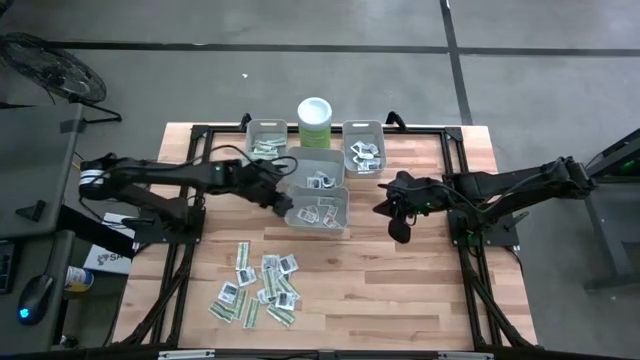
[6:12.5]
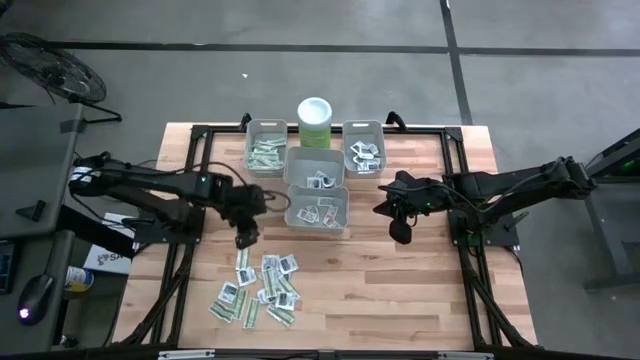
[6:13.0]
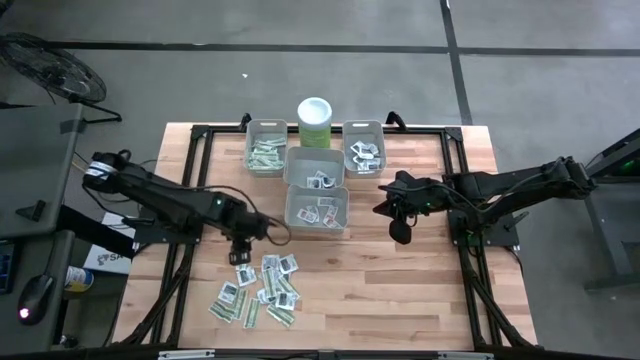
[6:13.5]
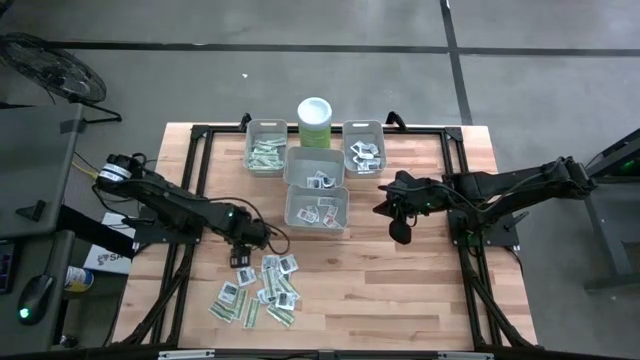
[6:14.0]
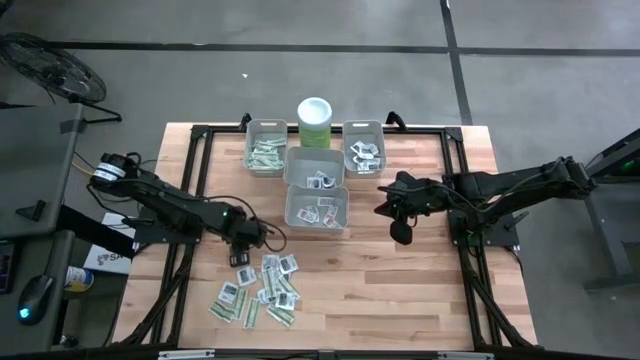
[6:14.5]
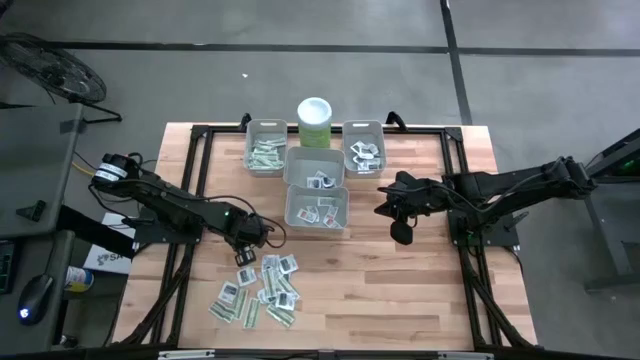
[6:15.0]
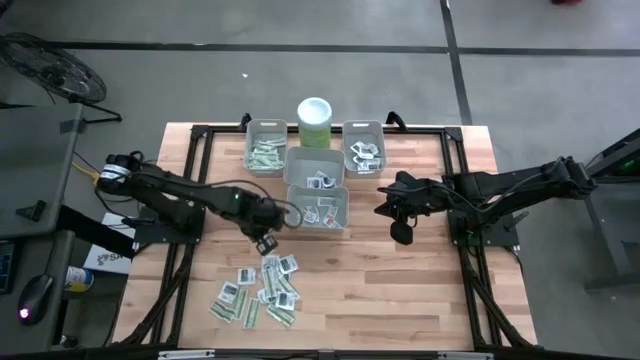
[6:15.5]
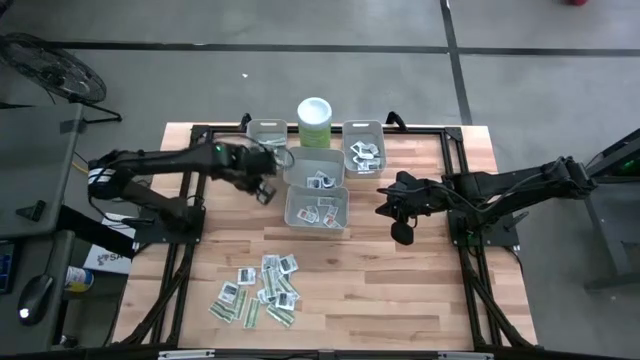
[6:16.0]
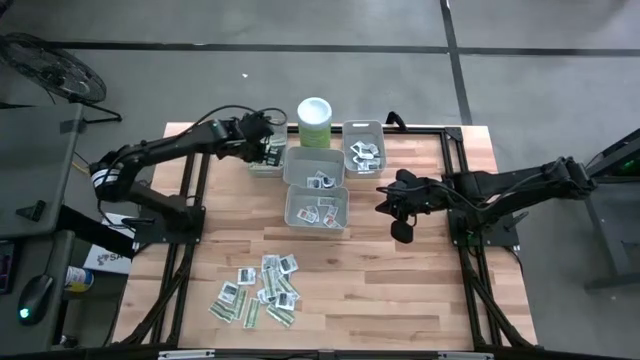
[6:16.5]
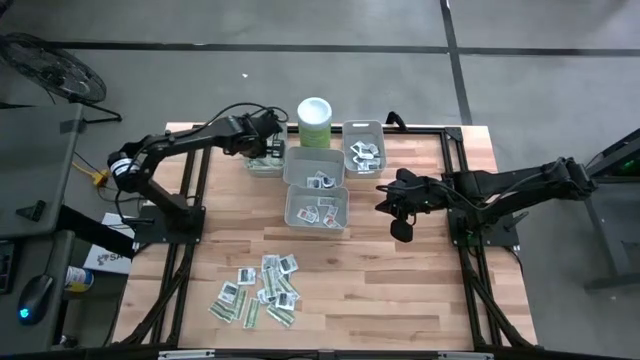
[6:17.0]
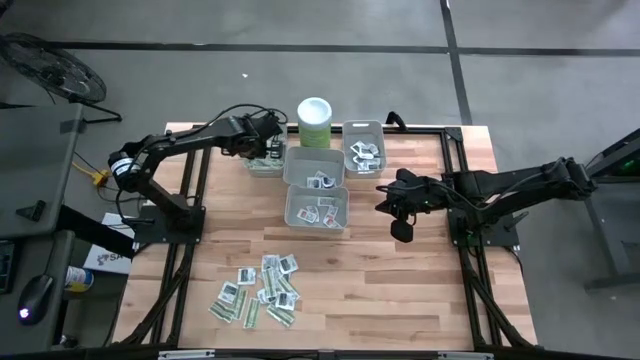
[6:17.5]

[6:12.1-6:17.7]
Task: Pick & Place First Aid Supplies
Put the bandage pack into the left bin

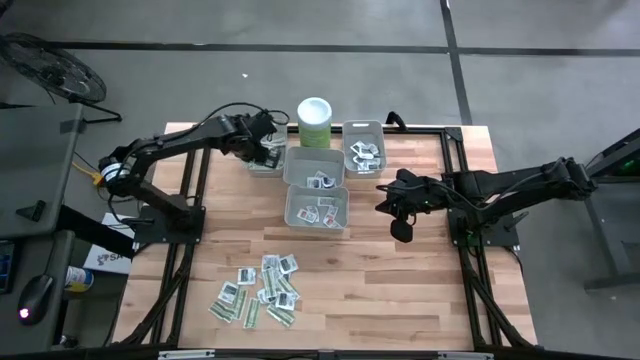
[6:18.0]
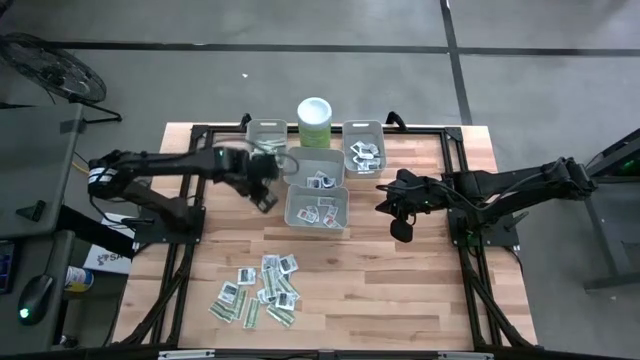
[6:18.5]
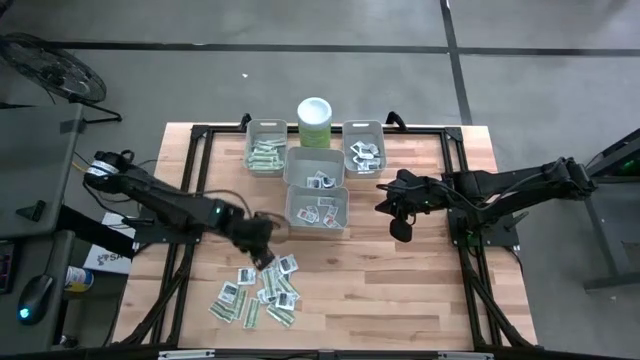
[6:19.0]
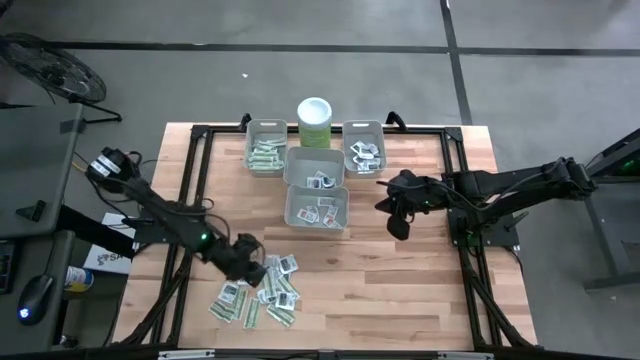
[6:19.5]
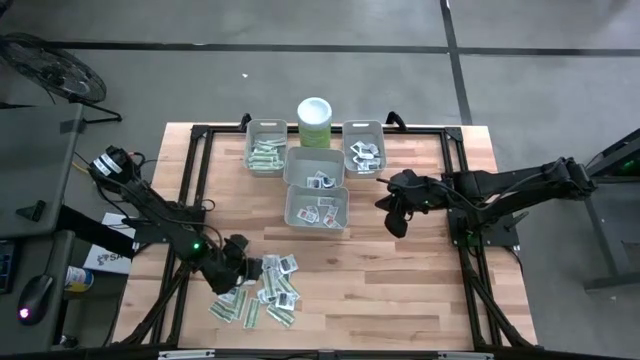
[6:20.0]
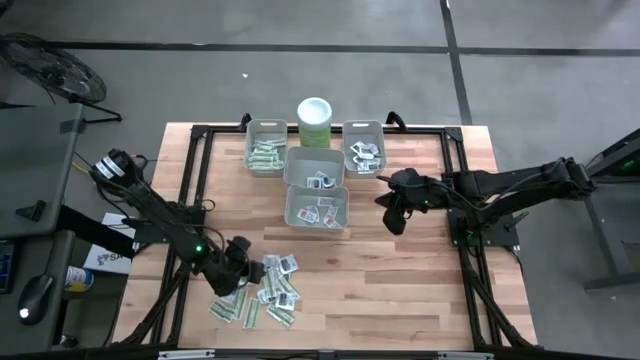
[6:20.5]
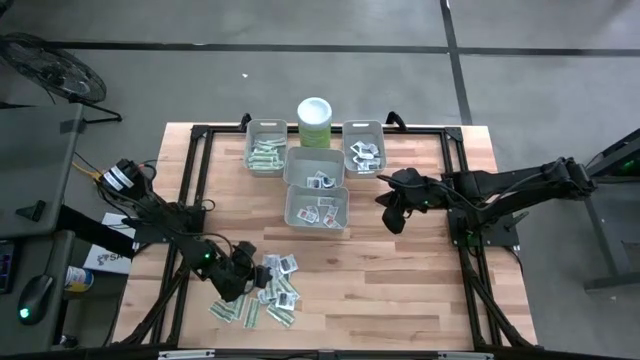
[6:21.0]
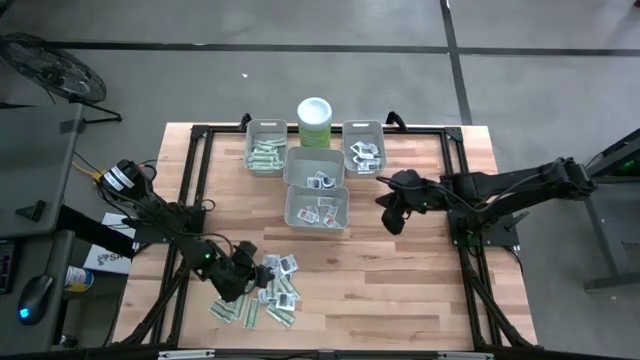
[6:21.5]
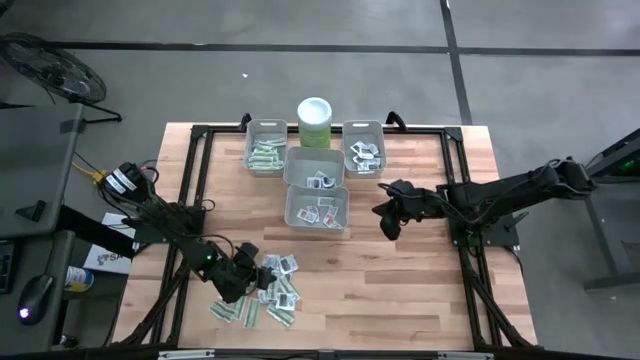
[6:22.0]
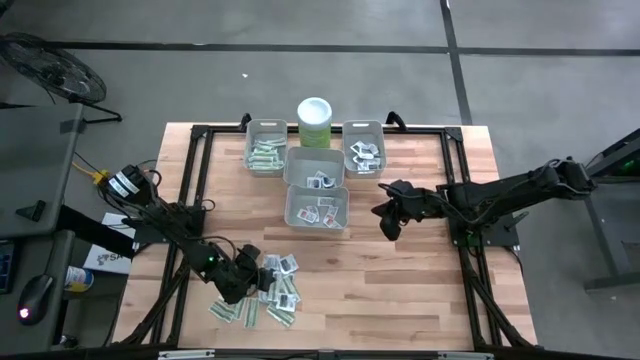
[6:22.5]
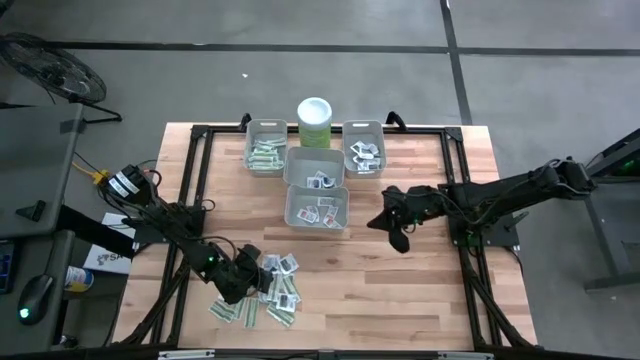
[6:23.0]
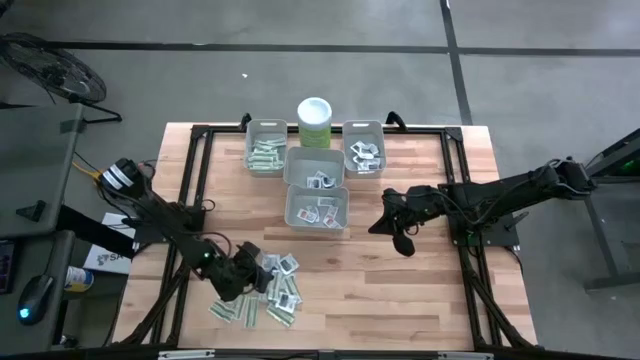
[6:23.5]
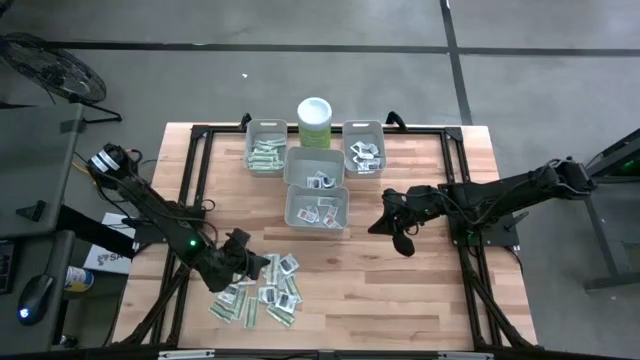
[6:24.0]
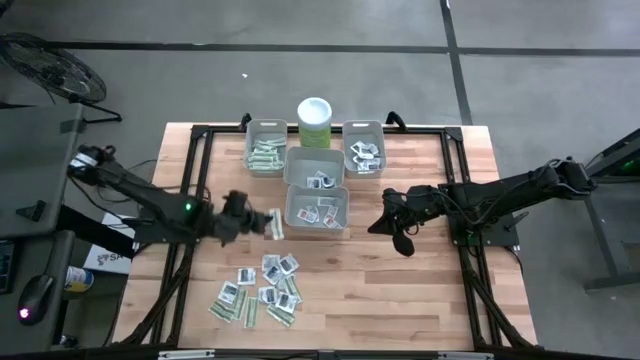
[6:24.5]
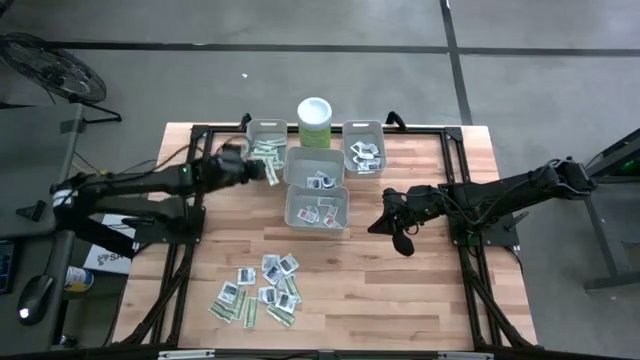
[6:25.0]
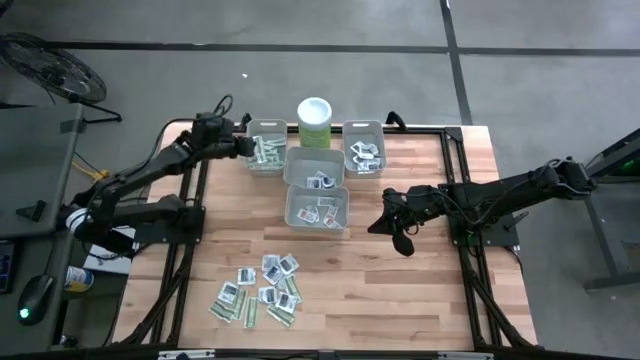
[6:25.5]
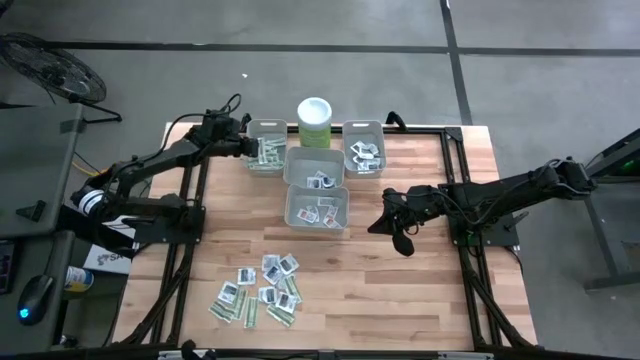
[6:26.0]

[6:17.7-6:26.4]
Put the bandage pack into the left bin

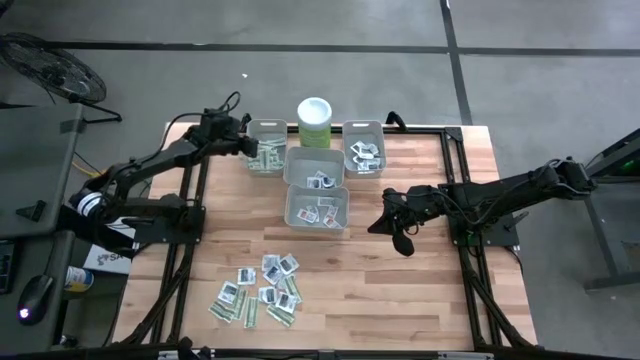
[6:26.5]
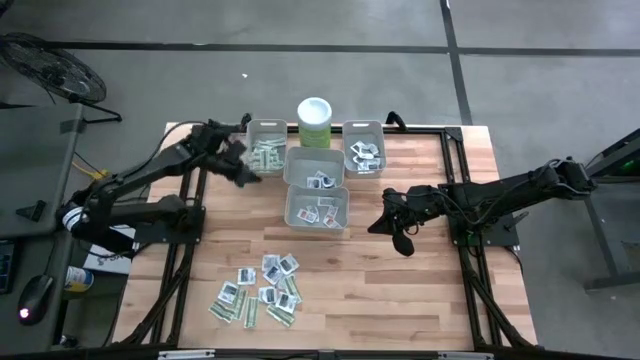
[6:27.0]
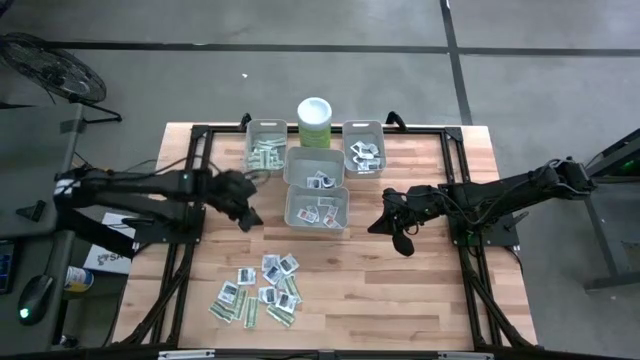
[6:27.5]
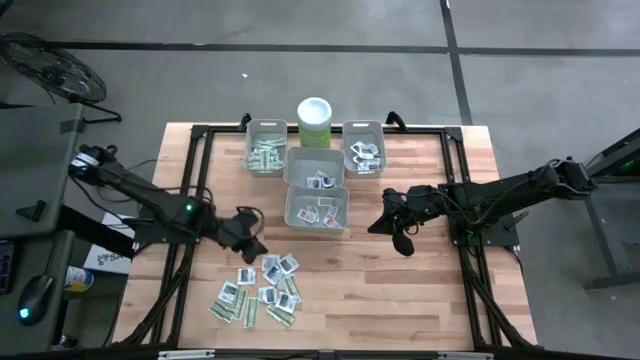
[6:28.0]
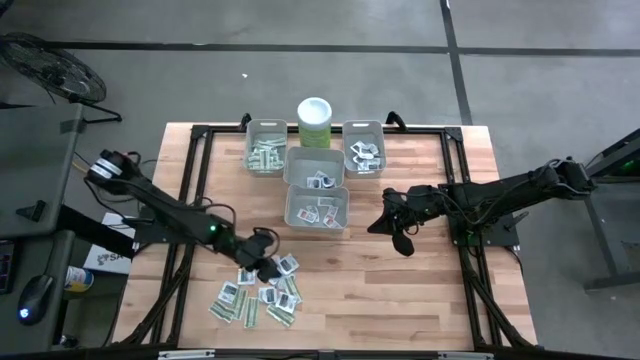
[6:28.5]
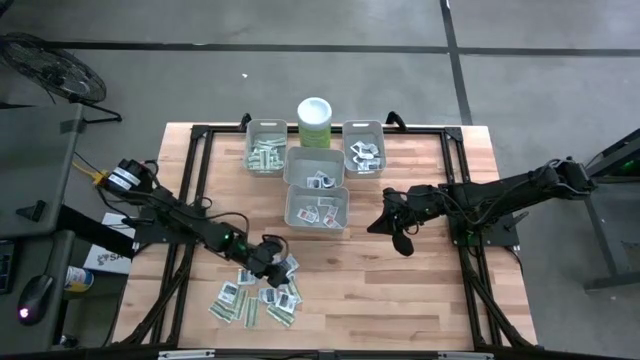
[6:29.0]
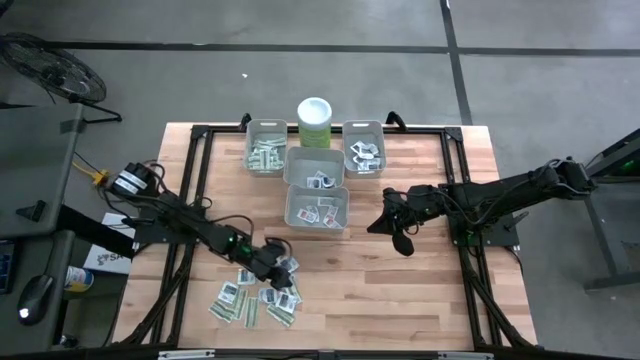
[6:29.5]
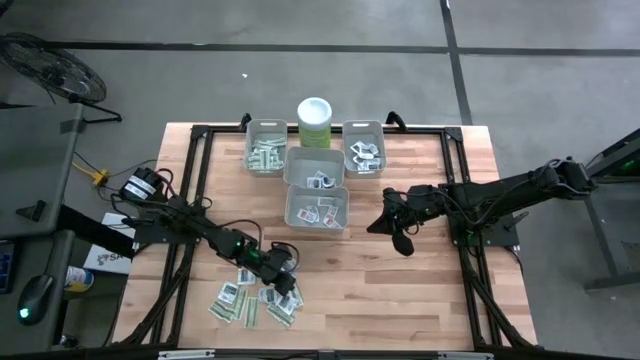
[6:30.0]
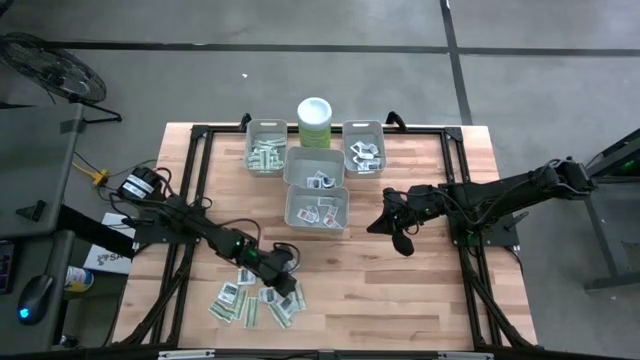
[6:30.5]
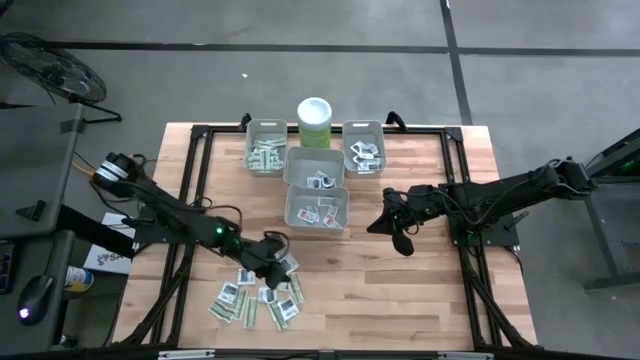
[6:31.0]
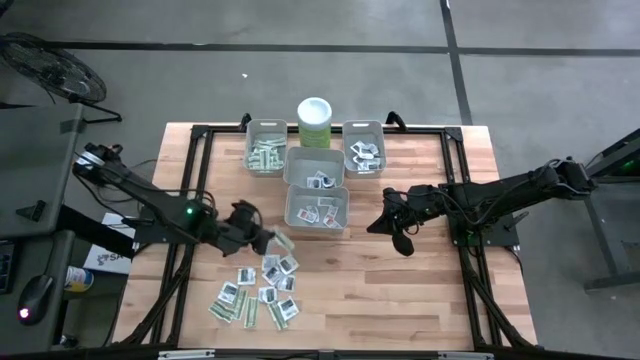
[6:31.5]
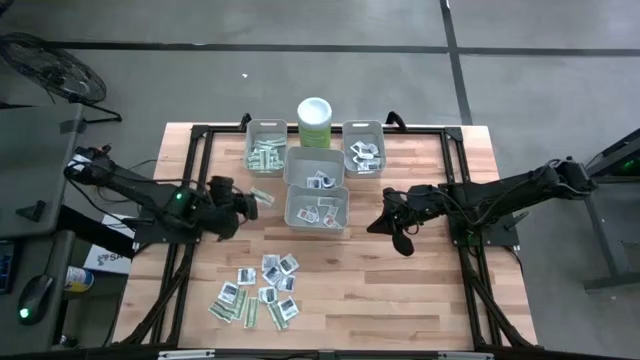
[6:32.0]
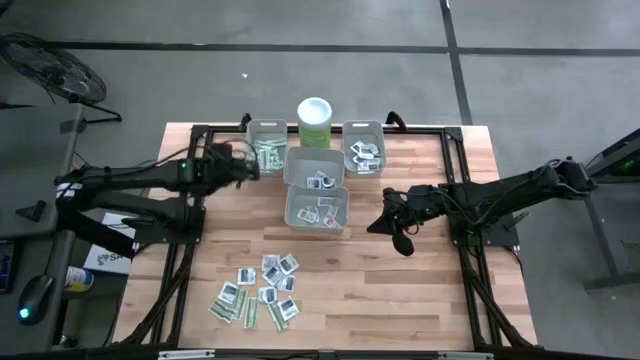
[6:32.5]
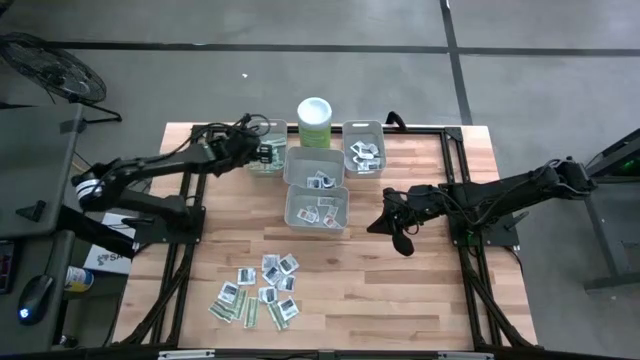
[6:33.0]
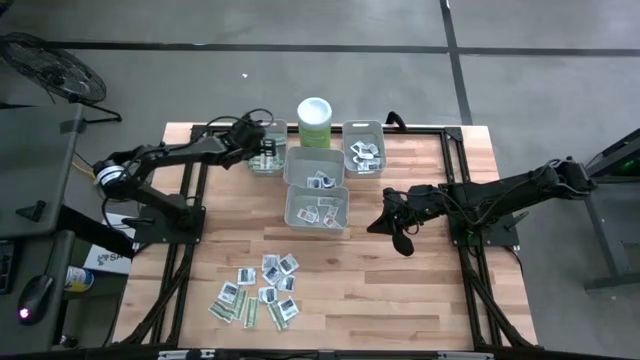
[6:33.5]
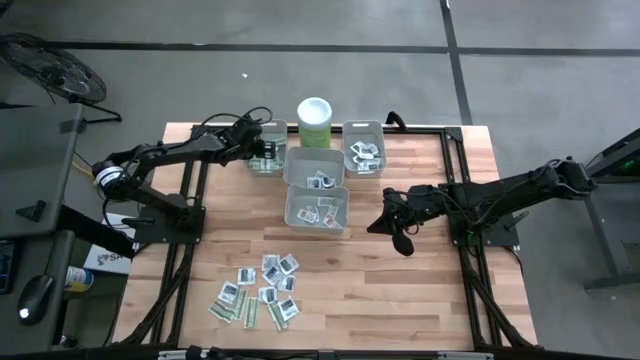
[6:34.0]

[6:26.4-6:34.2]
Put the bandage pack into the left bin

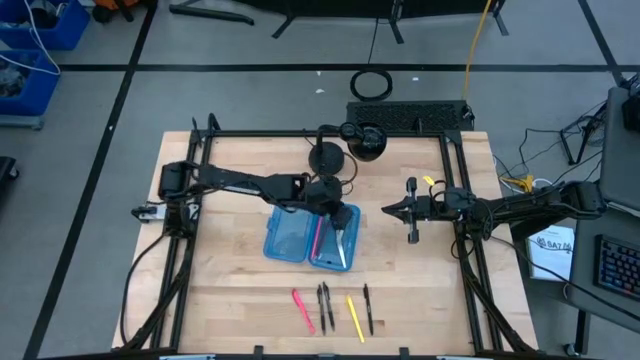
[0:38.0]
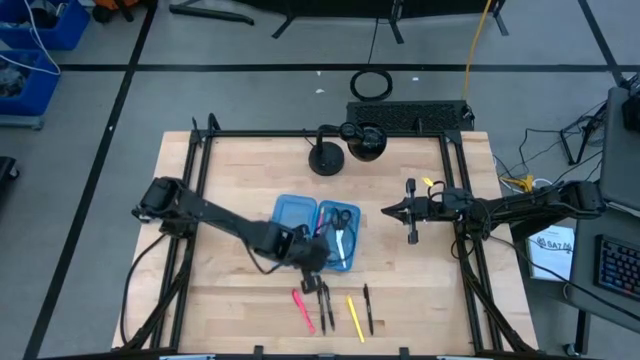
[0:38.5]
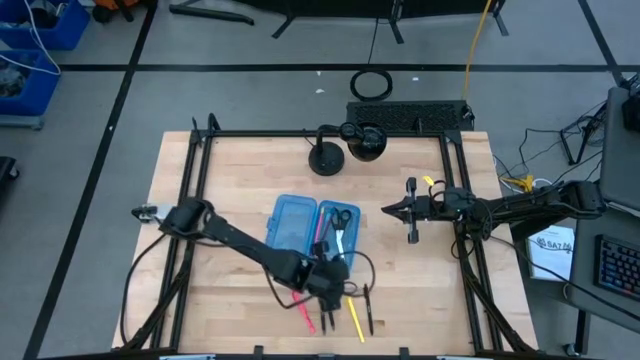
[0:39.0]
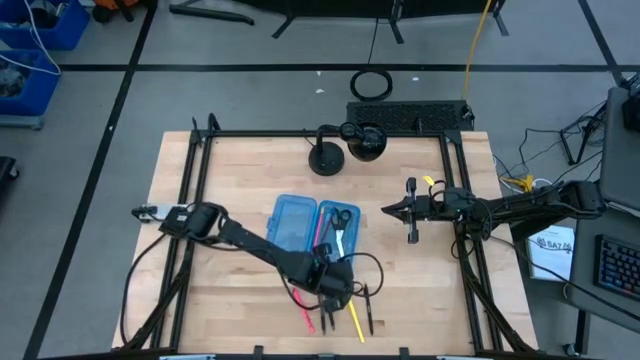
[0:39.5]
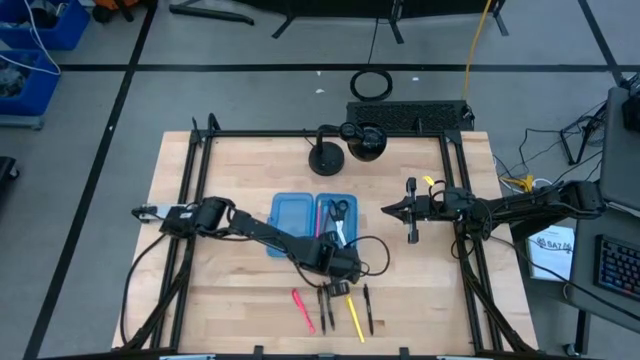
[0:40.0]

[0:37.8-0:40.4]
Task: Pick & place school supplies into a supply box
Adjust the blue supply box on the table
